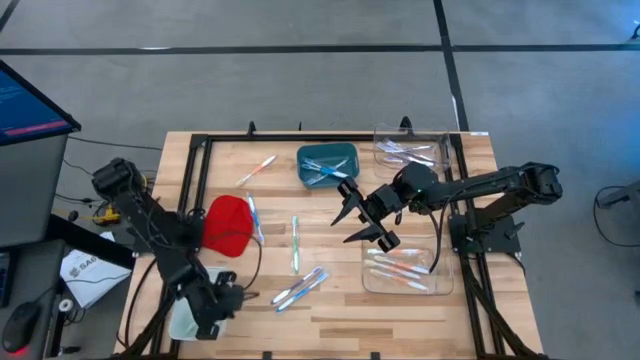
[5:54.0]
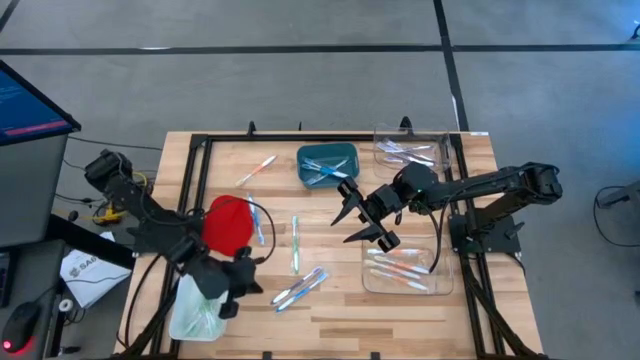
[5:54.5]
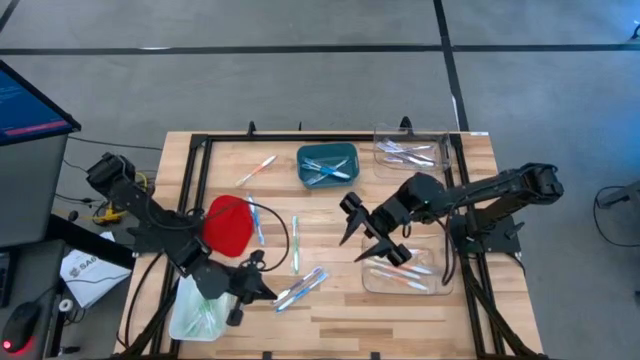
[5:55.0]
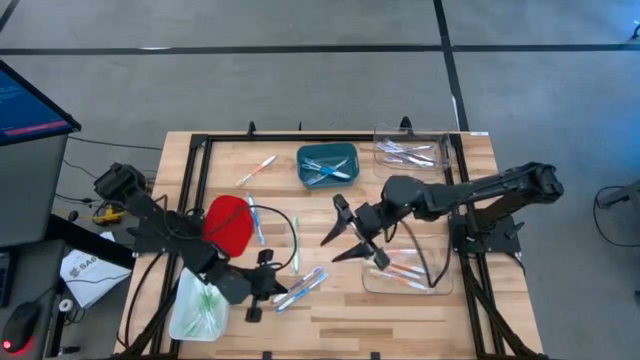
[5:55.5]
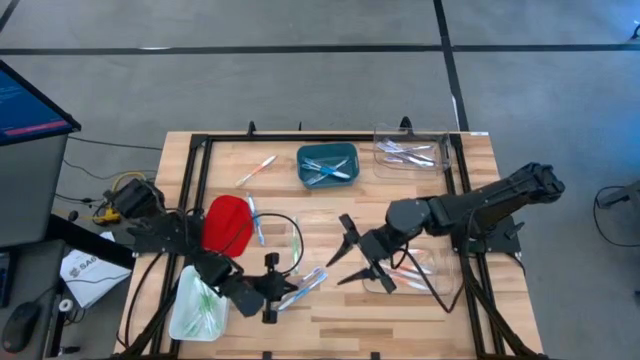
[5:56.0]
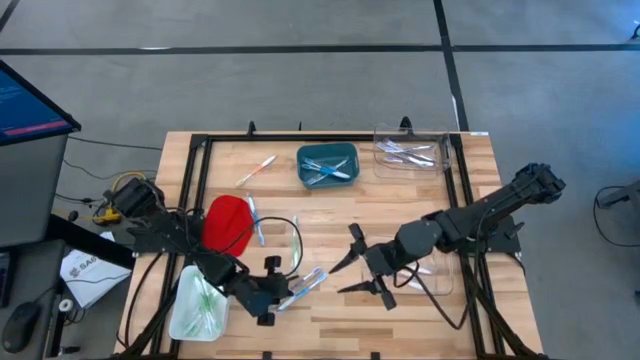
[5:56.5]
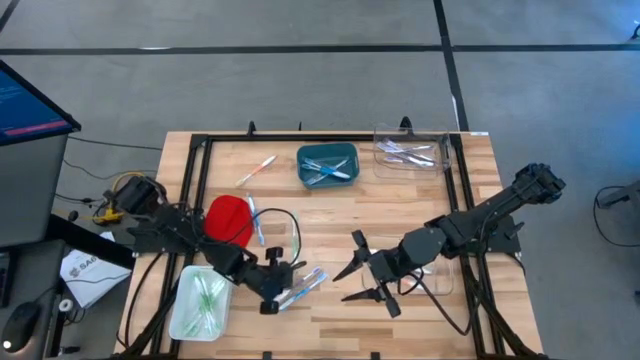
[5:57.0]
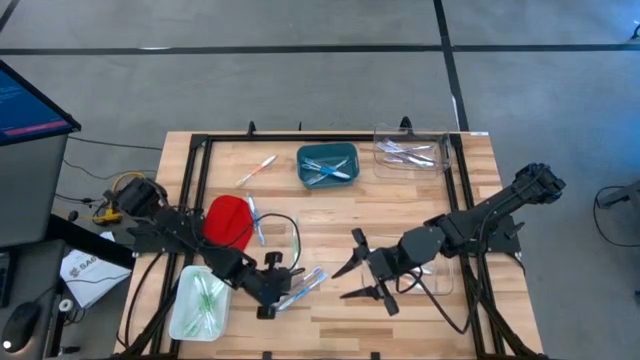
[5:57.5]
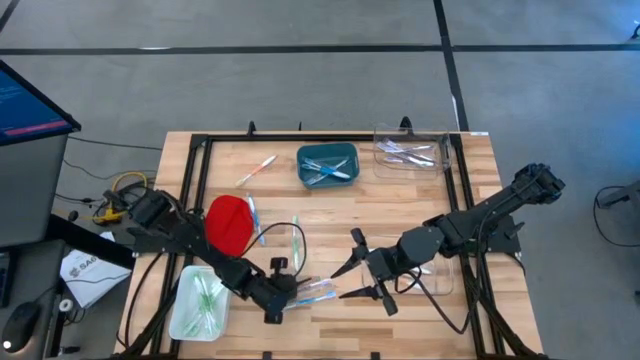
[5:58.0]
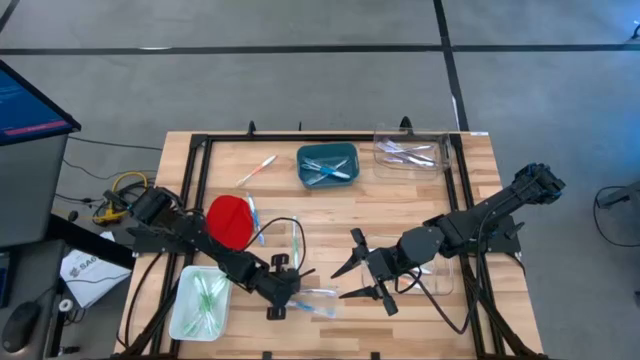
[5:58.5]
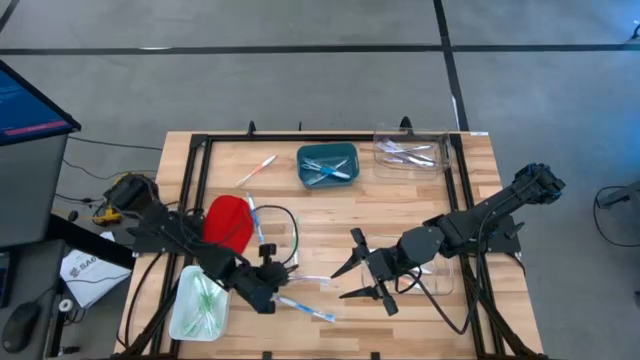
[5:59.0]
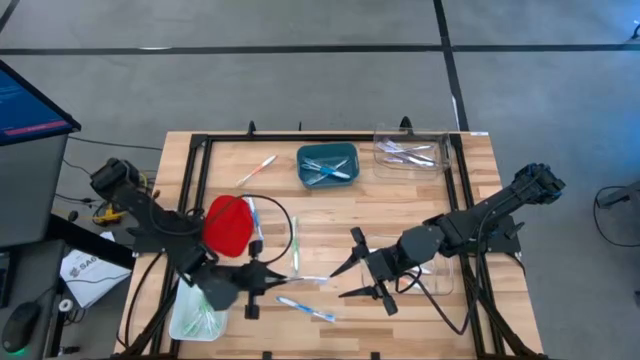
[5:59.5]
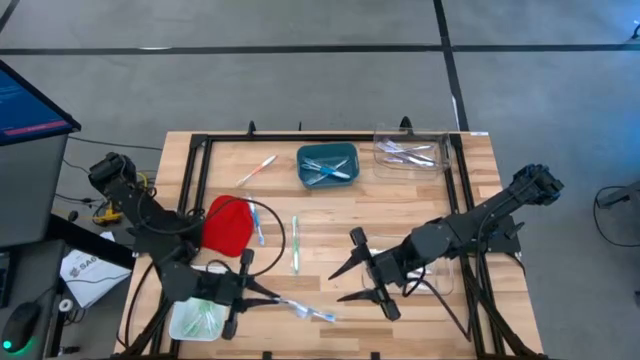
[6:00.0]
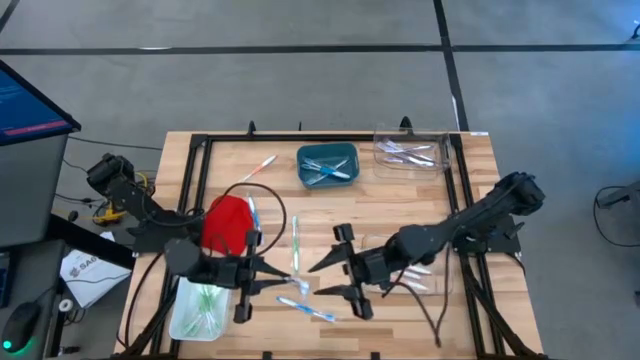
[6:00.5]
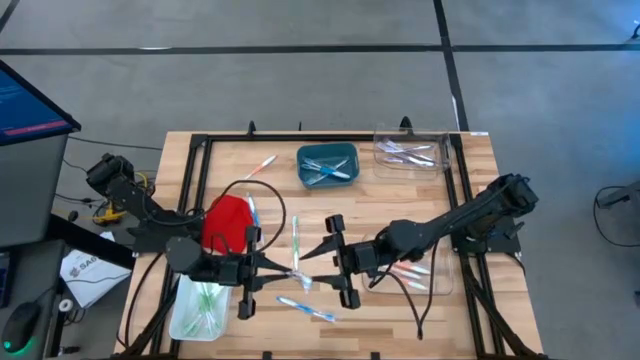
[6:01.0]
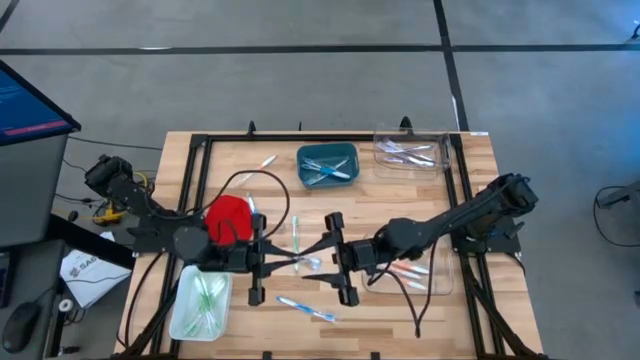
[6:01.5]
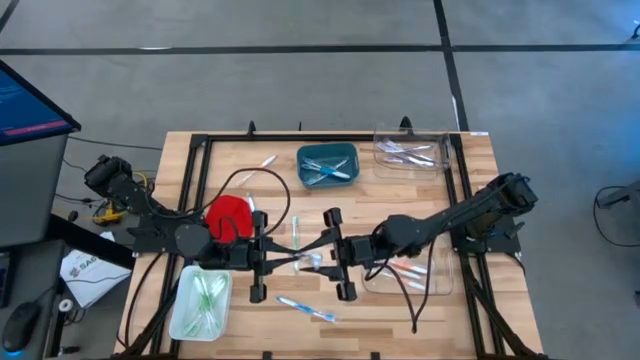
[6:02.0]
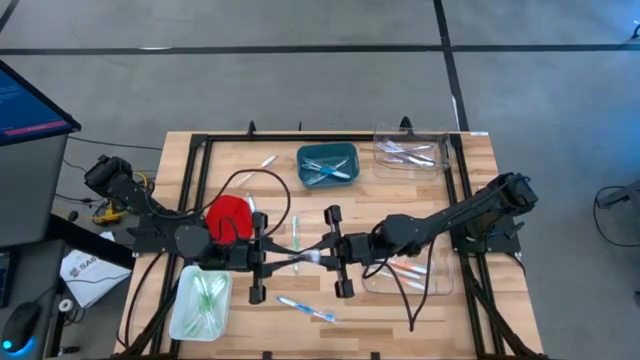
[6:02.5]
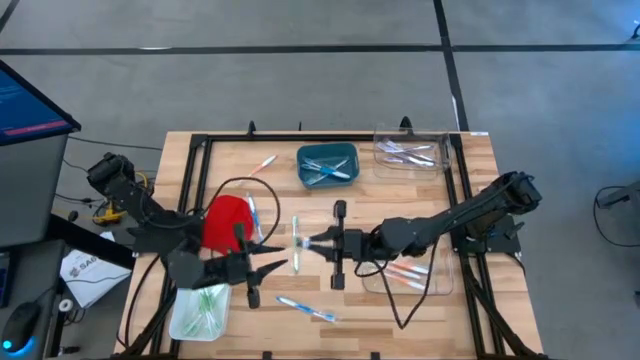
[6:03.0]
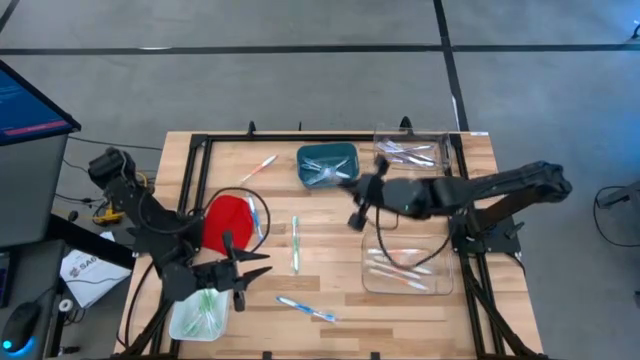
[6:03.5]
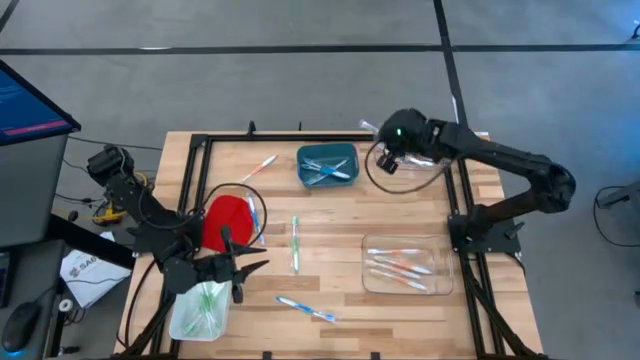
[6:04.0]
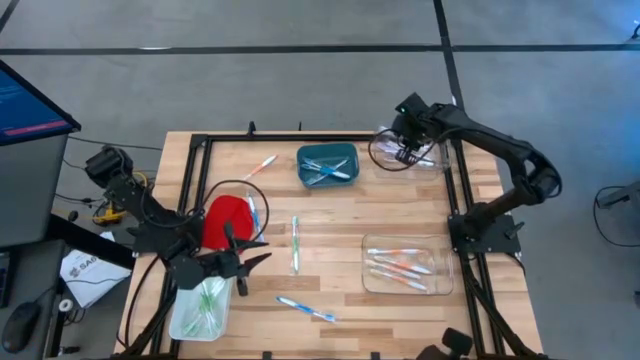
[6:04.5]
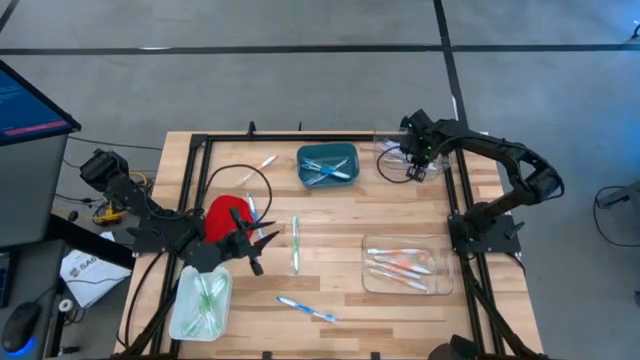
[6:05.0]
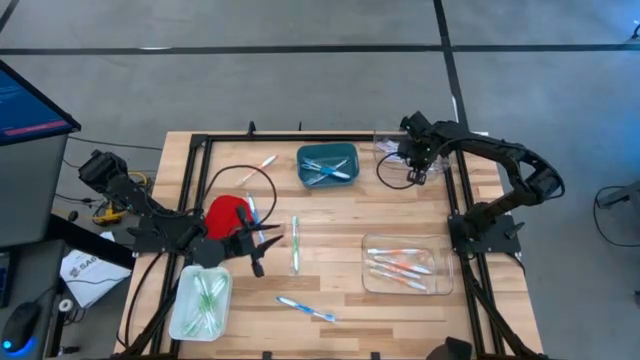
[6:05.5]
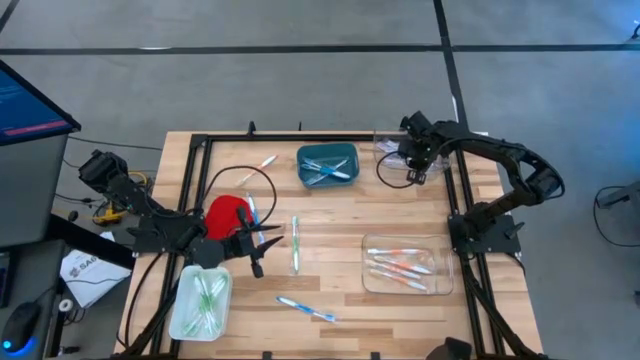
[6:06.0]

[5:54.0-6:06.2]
Task: Pick & Place Toothbrushes
Put the purple toothbrush into the top transparent bin

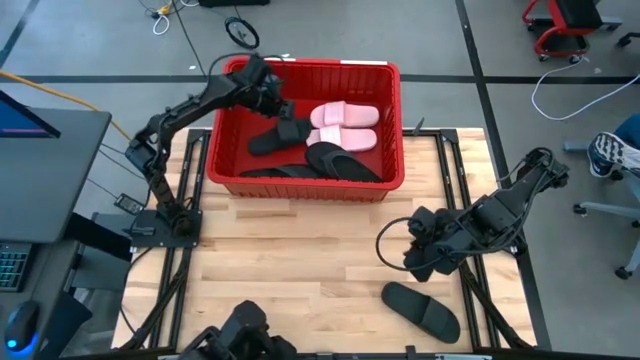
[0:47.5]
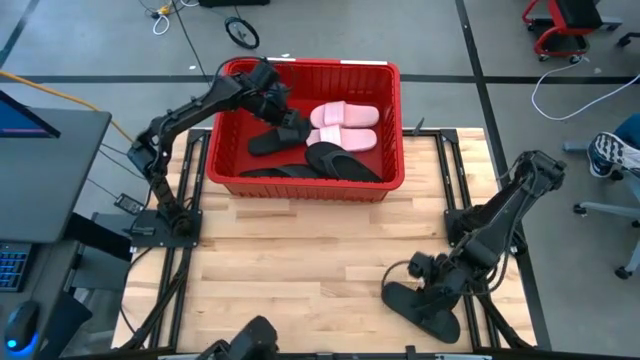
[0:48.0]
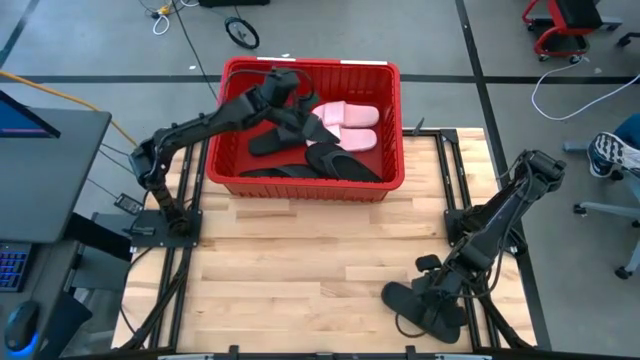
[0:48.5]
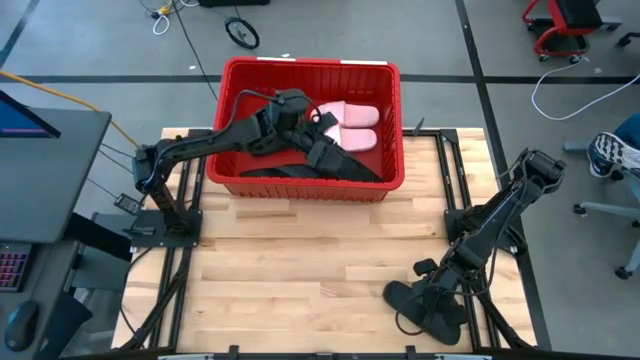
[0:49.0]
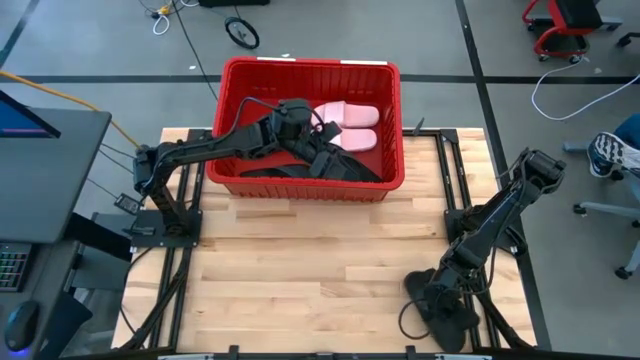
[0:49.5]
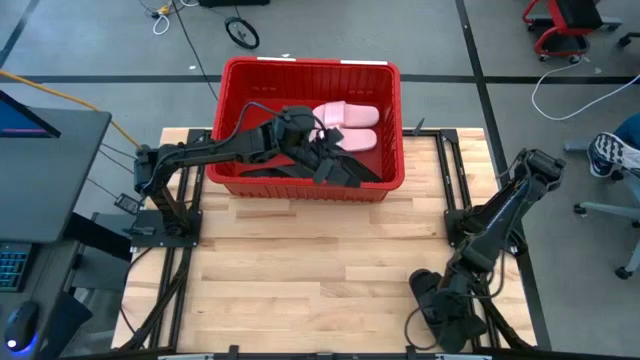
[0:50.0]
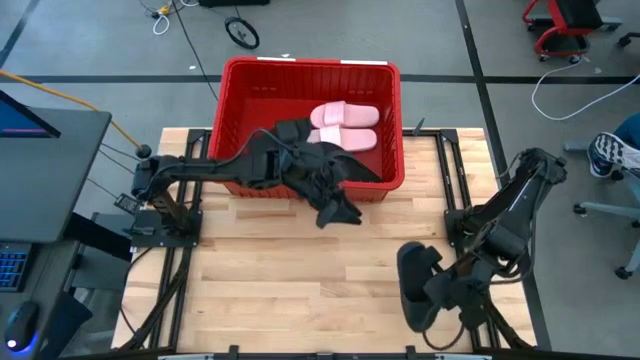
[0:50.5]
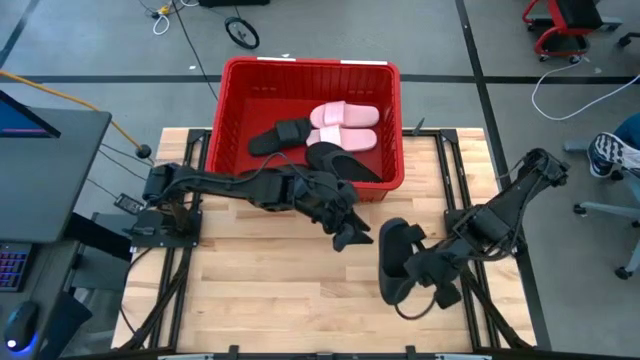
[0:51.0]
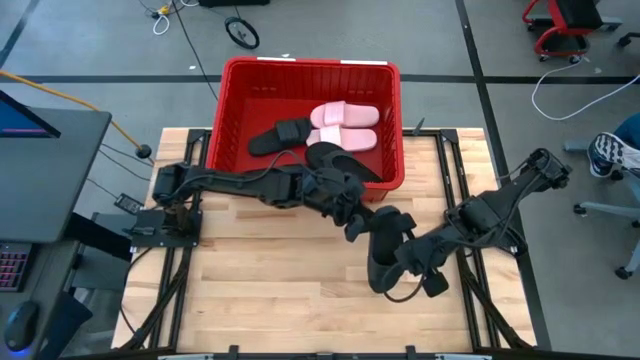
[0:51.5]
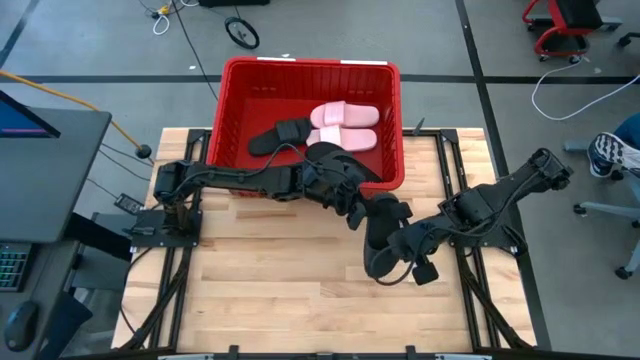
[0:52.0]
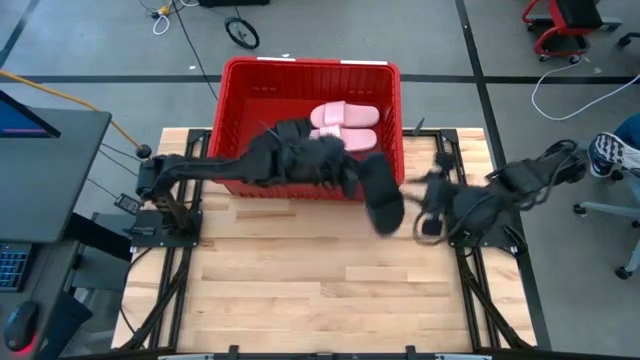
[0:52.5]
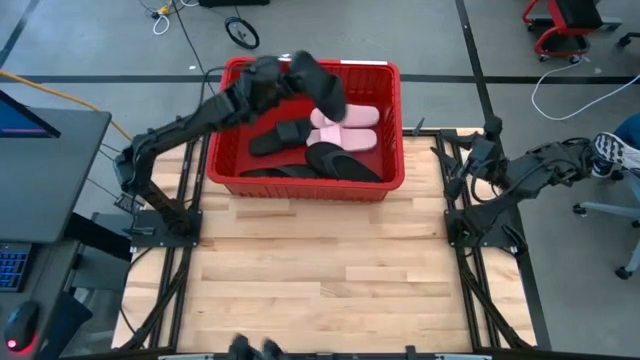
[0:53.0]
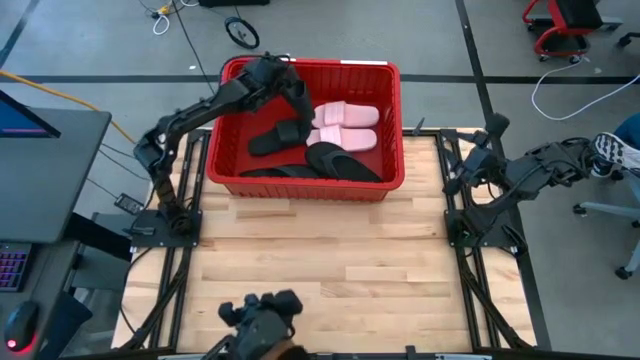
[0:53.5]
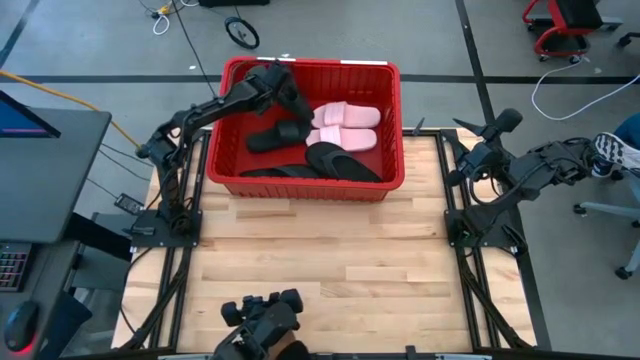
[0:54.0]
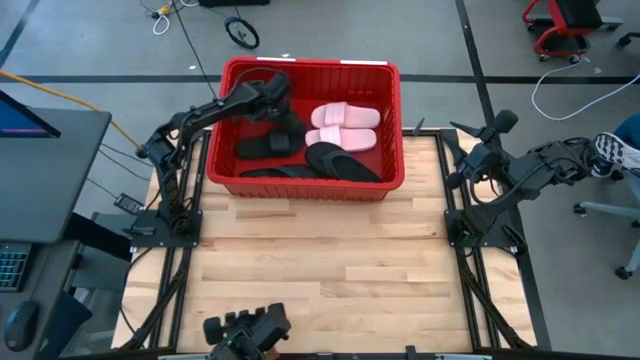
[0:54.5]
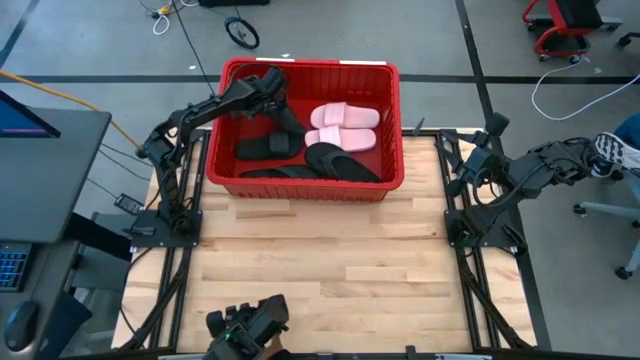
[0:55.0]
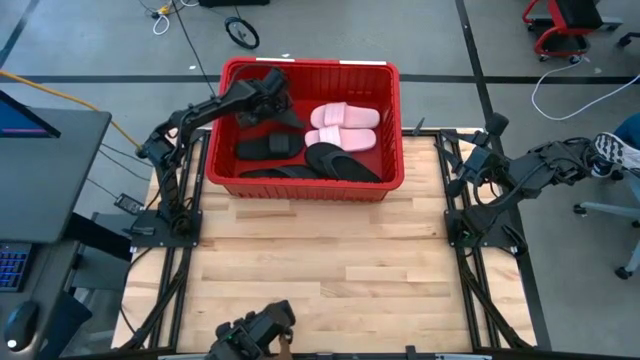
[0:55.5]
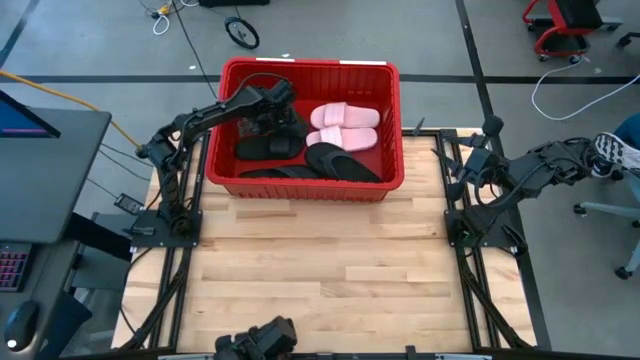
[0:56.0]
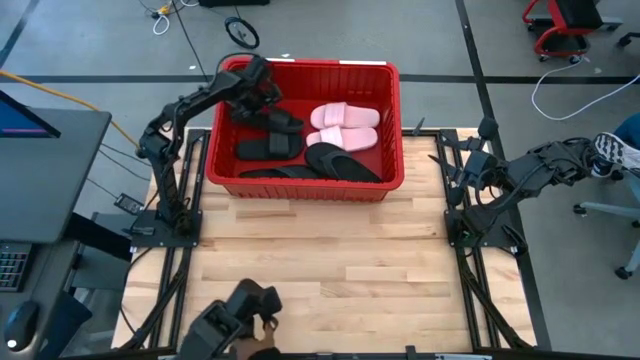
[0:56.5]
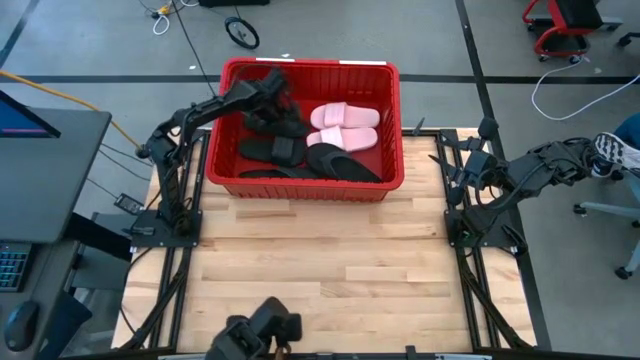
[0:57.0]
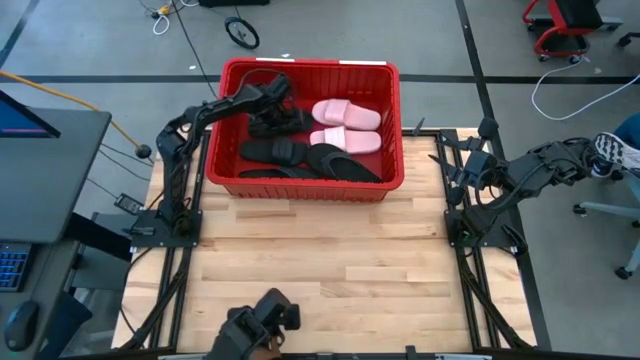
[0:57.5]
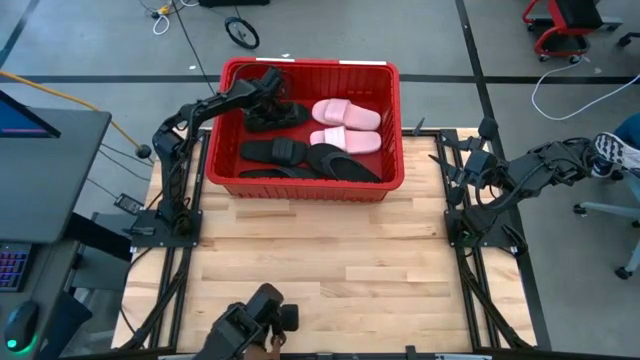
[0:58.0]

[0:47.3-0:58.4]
Task: Pick and place slides into bin
Put the black slide into the red bin
